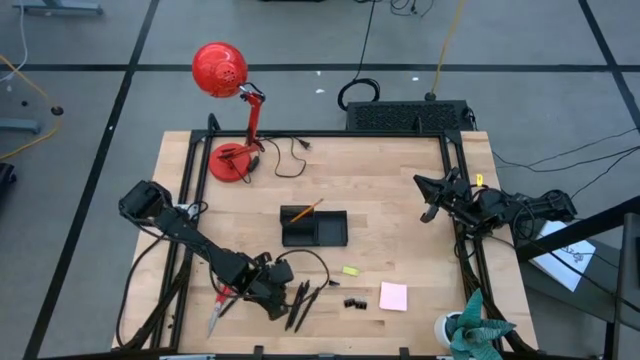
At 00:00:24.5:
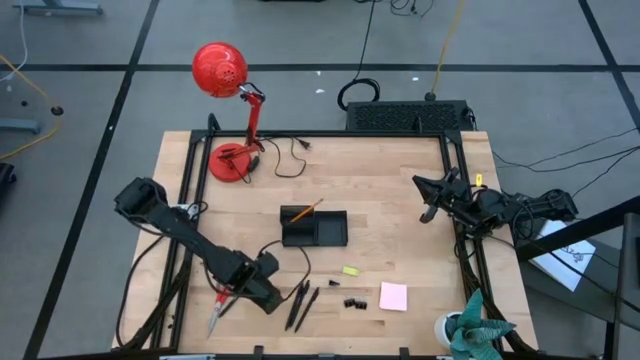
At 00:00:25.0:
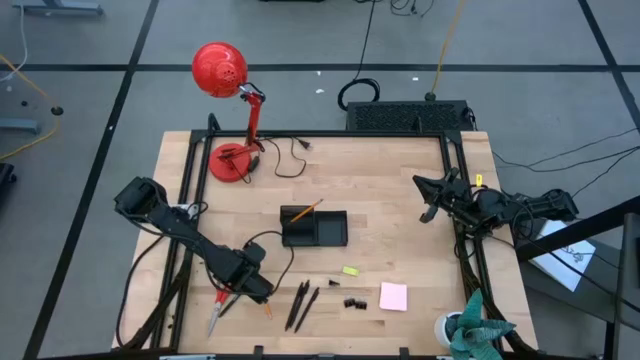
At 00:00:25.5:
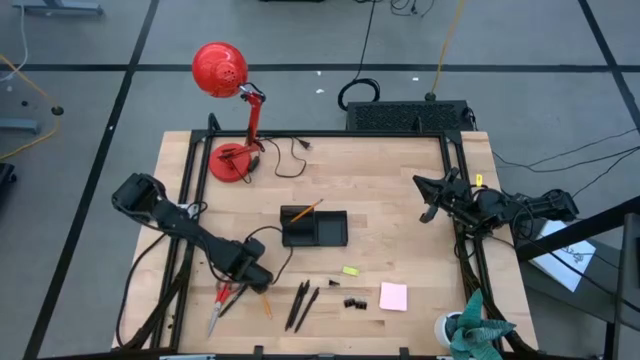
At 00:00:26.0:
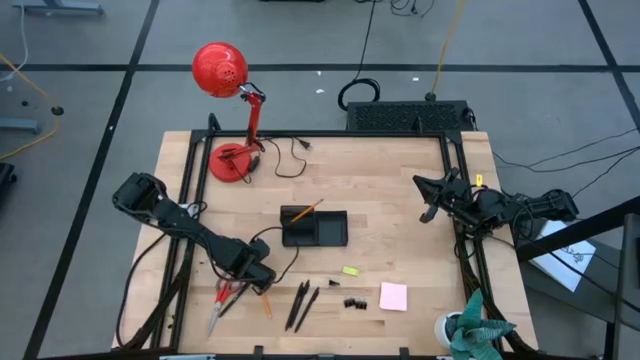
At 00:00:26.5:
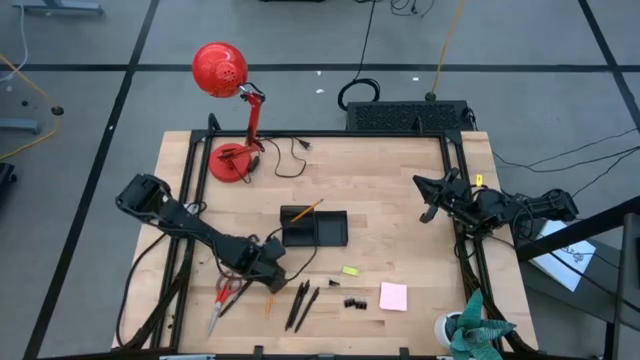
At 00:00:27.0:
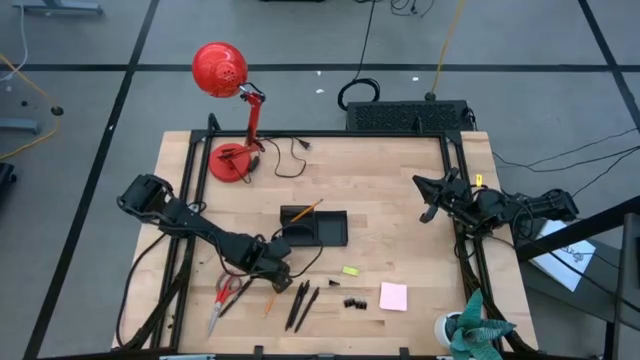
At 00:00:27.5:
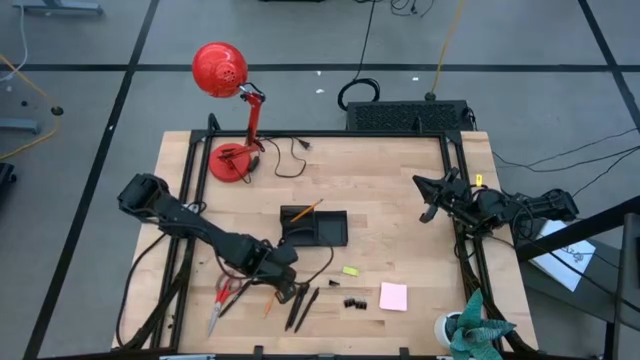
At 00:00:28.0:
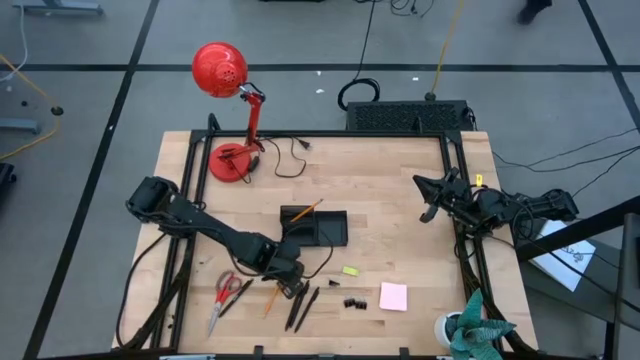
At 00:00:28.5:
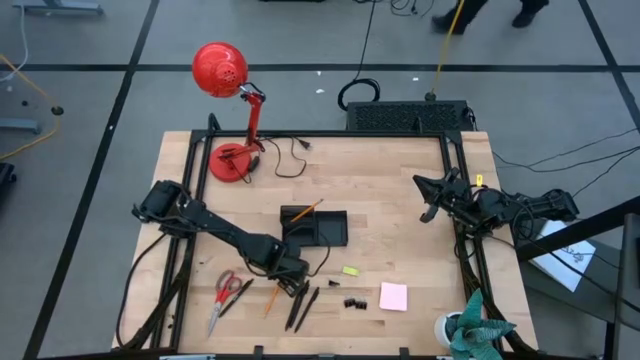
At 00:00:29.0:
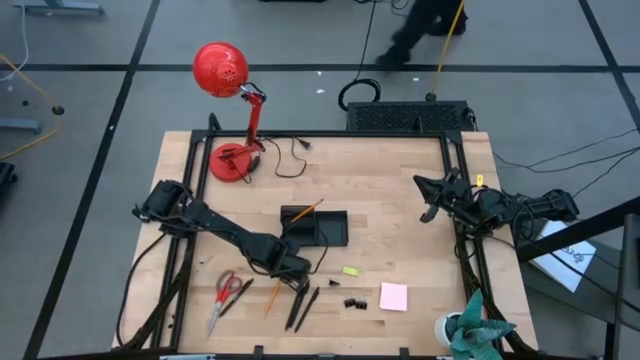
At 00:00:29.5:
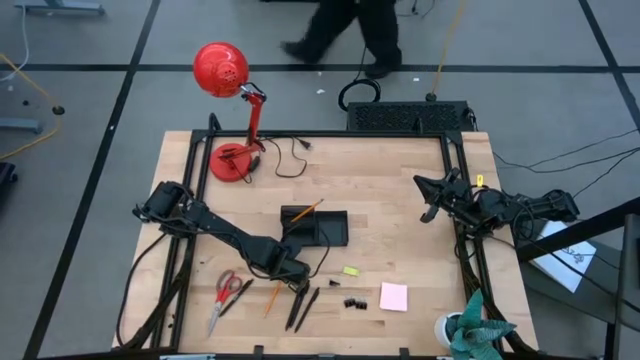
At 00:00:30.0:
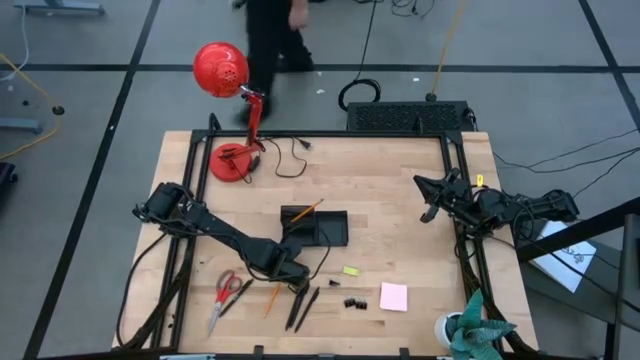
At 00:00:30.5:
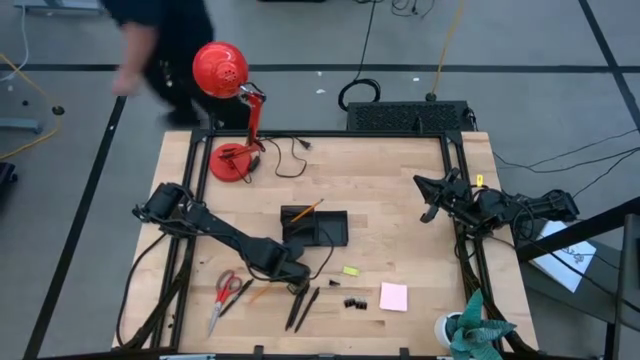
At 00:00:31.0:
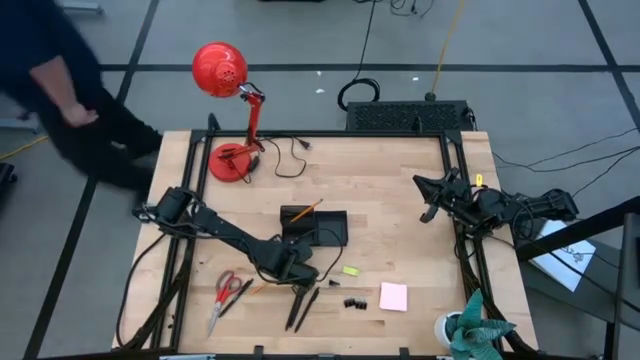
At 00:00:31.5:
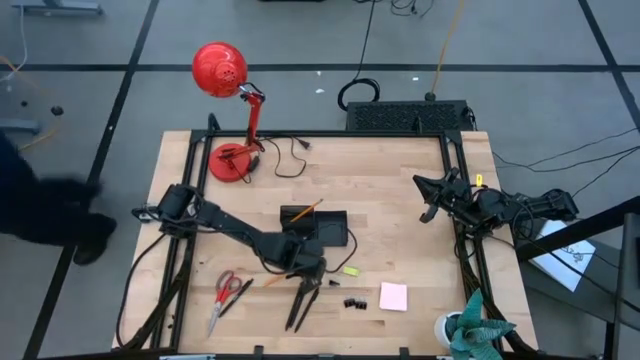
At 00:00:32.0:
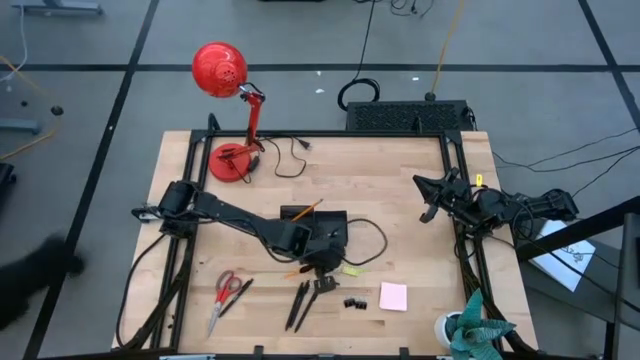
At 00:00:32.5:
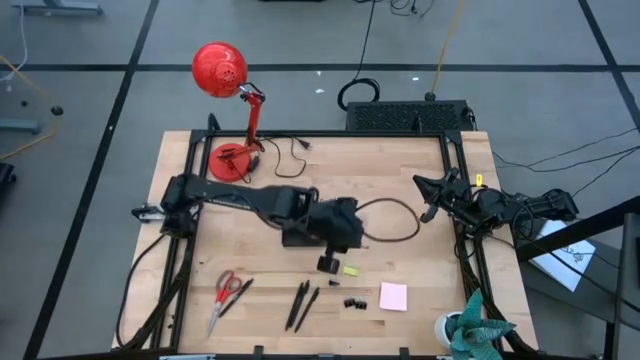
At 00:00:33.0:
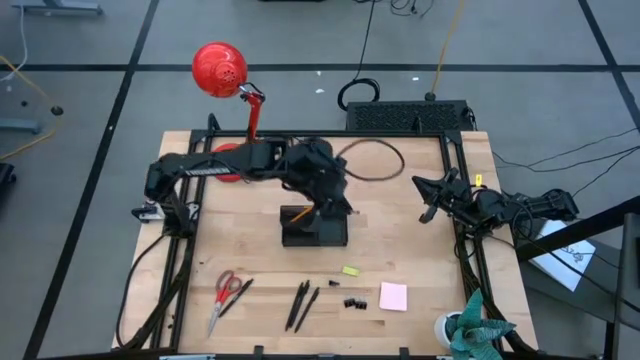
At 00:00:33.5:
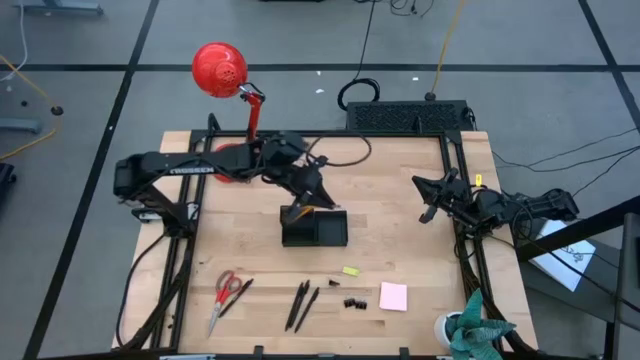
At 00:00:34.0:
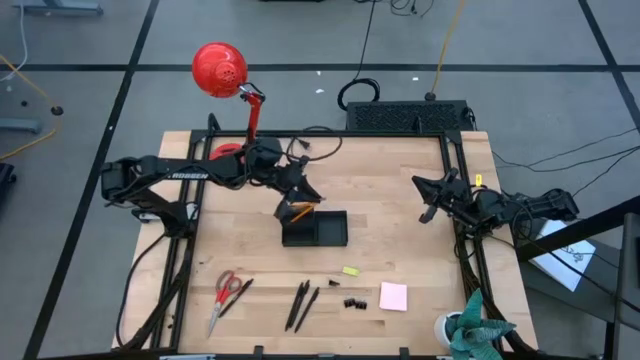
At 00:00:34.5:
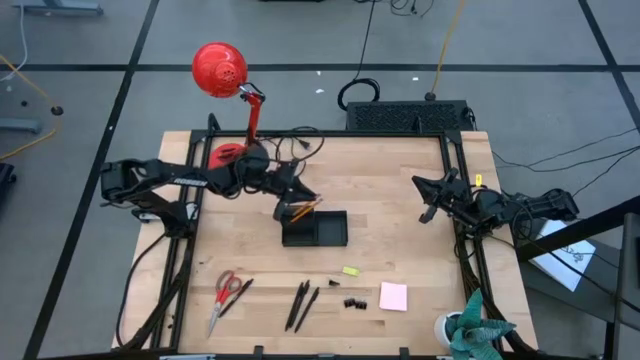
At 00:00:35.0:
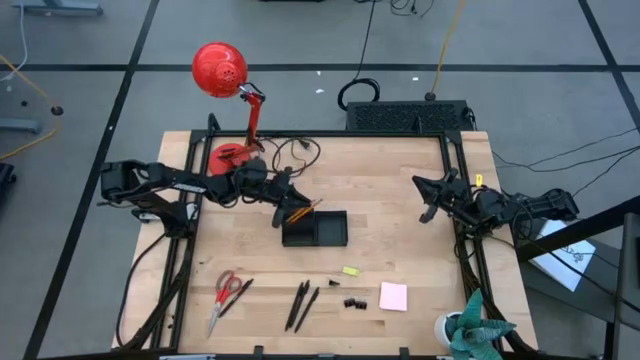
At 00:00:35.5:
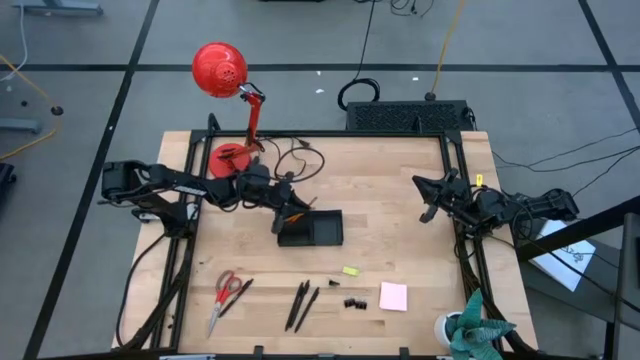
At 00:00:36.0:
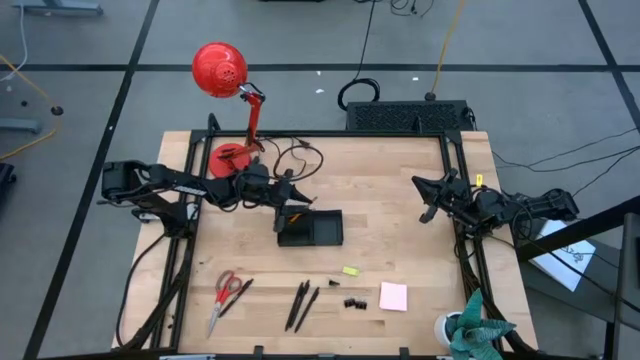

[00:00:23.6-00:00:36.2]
Task: Pick and place office supplies into organizer
Put the pencil into the top left section of the desk organizer

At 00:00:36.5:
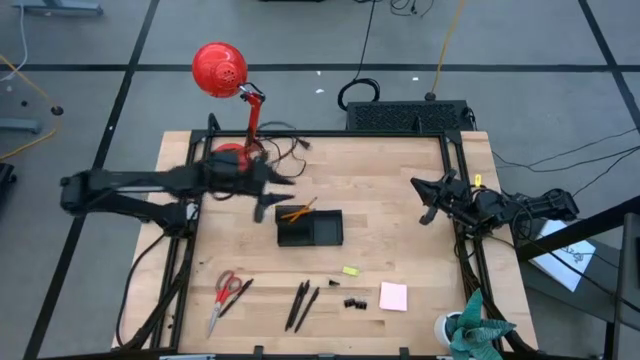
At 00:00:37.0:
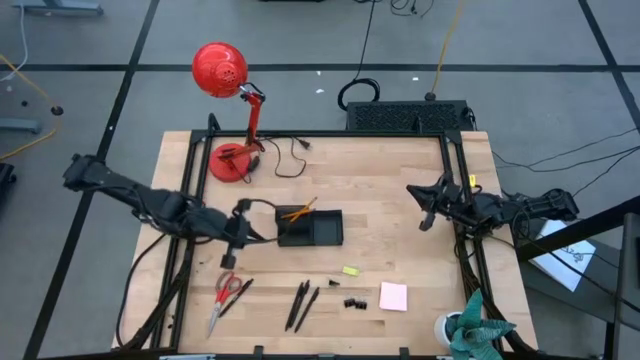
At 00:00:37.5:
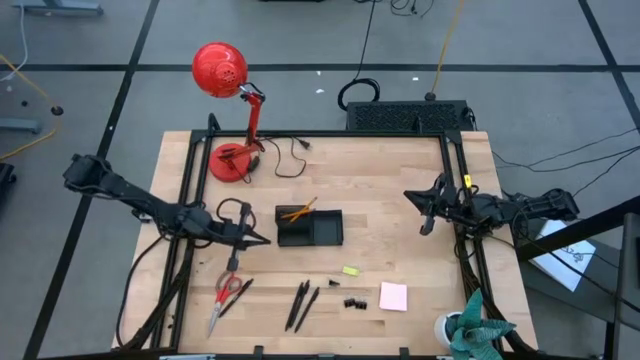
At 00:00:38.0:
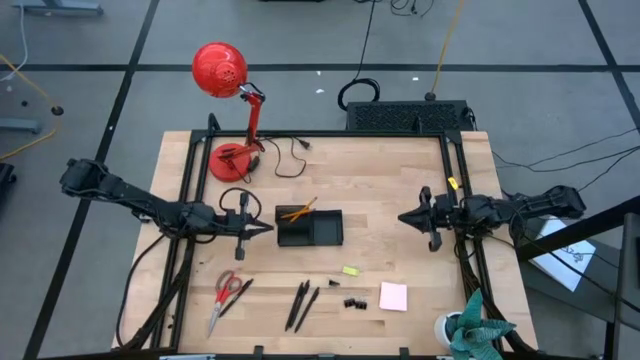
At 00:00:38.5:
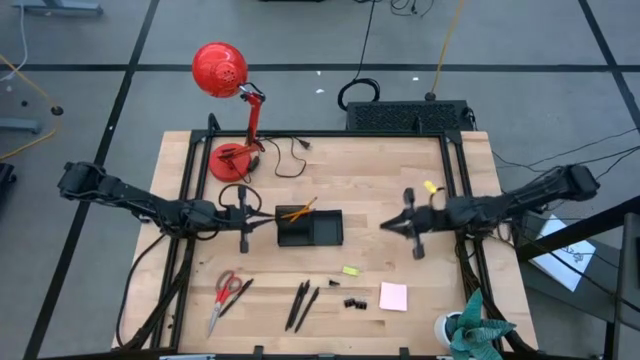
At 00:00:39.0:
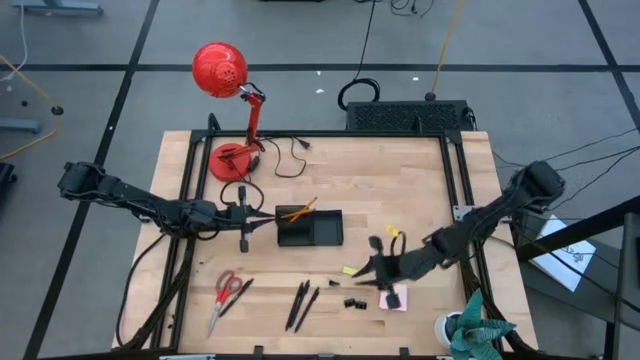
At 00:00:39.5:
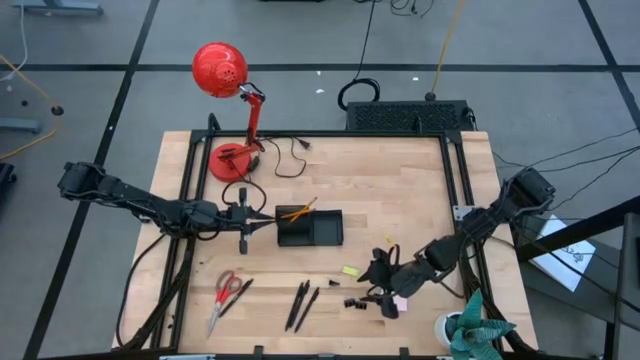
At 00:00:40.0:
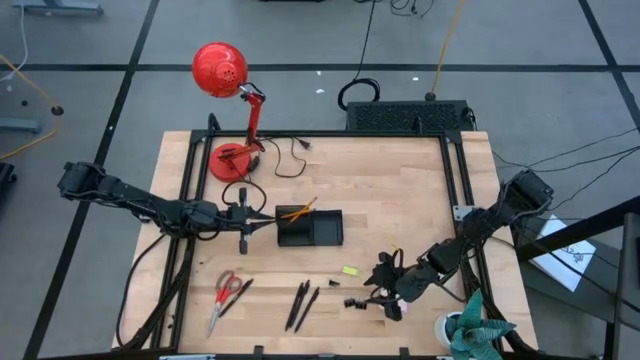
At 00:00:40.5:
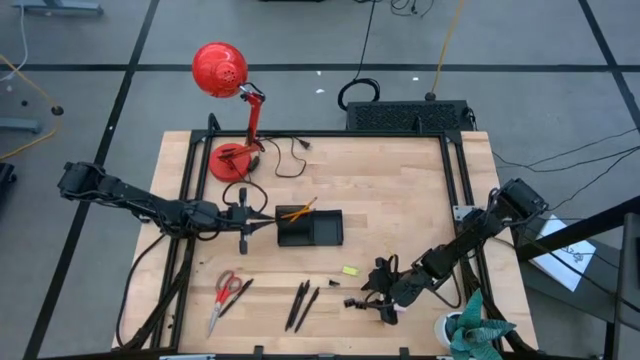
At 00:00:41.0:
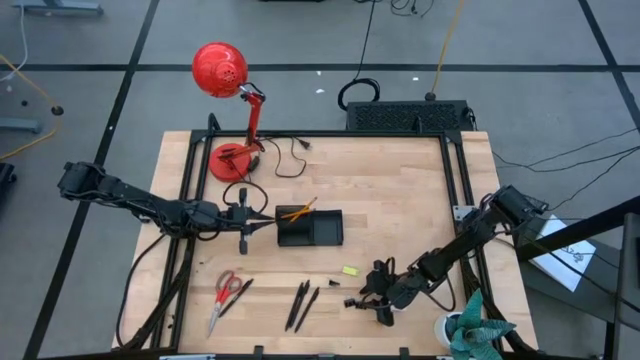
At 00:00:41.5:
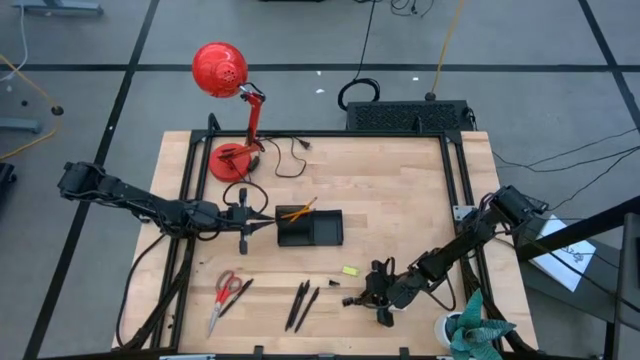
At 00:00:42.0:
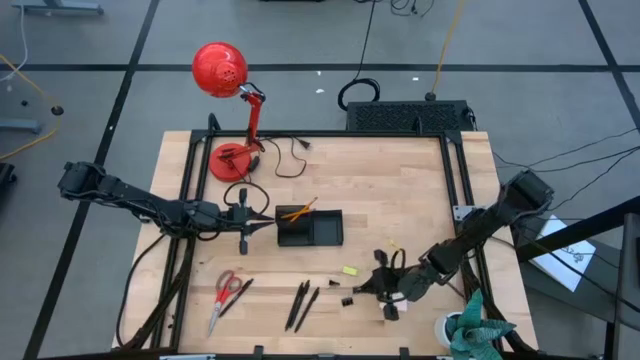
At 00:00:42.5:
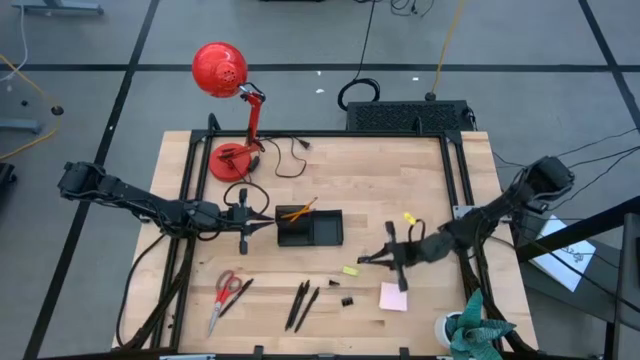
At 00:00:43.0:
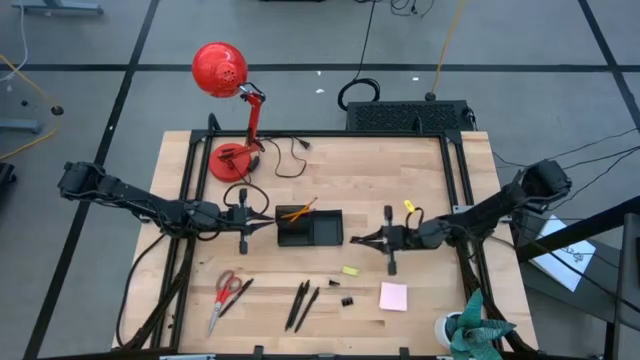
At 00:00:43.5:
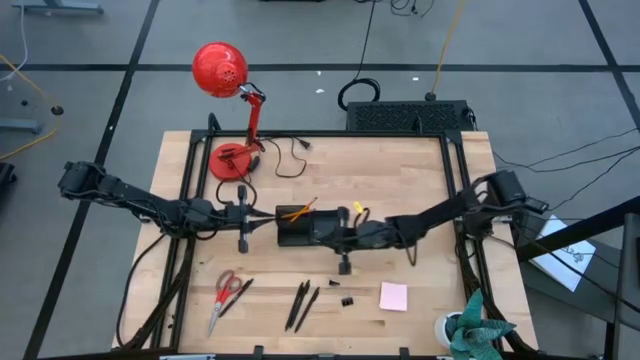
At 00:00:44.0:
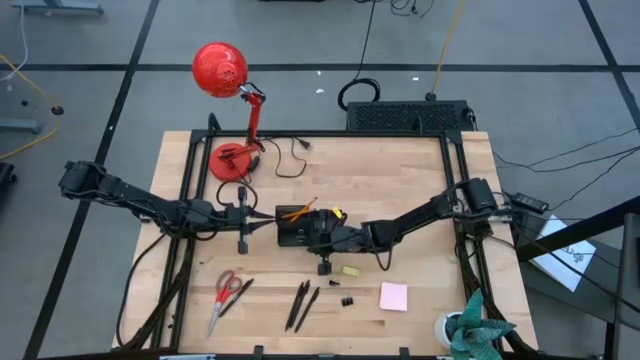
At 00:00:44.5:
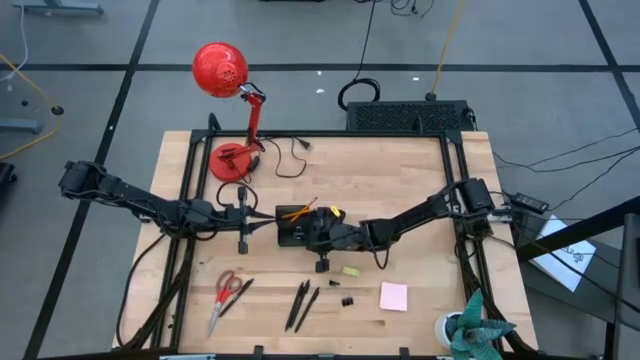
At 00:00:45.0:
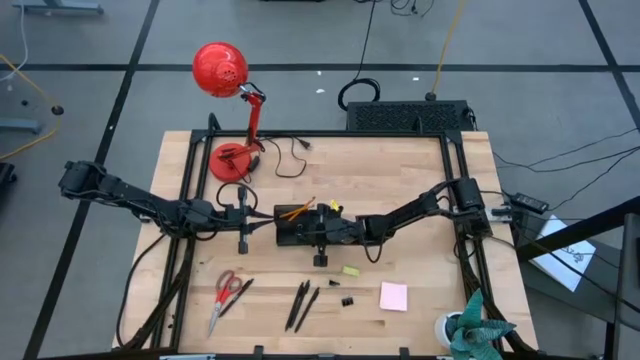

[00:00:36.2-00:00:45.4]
Put the right binder clip into the bottom left section of the desk organizer

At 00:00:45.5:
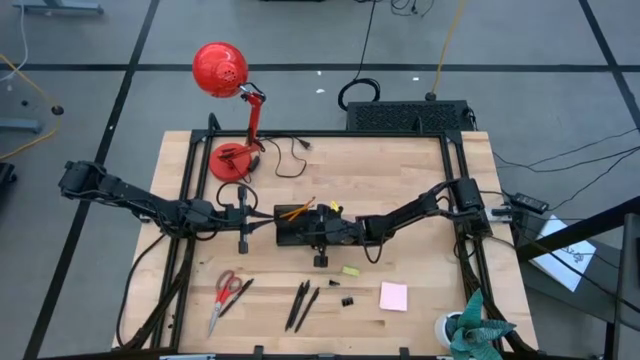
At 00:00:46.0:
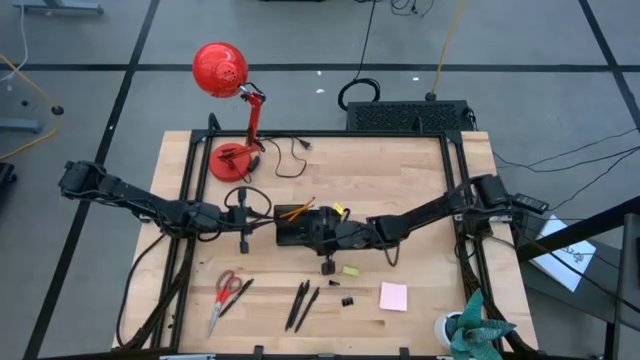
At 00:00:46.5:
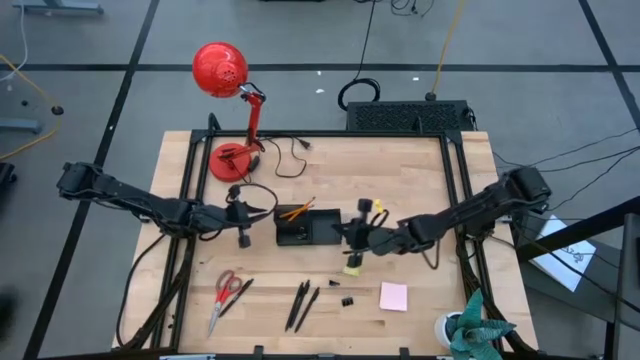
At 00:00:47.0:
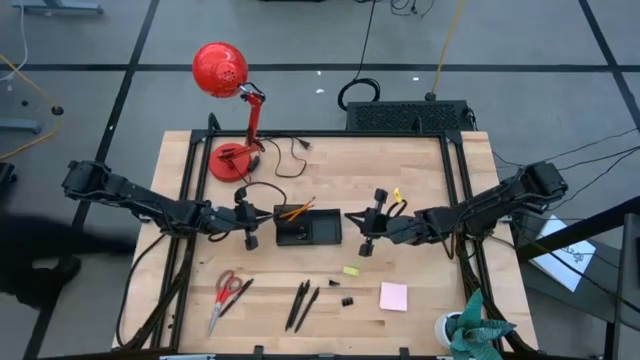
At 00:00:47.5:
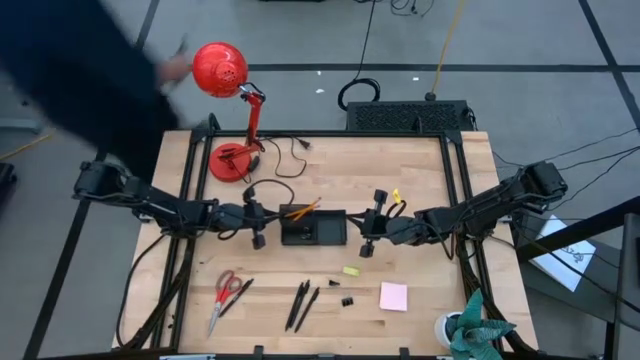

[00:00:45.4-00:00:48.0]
Adjust the black desk organizer
